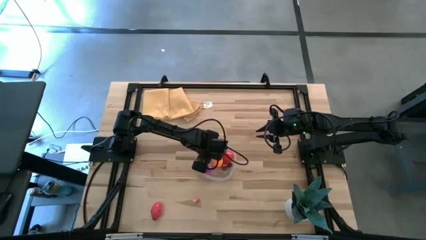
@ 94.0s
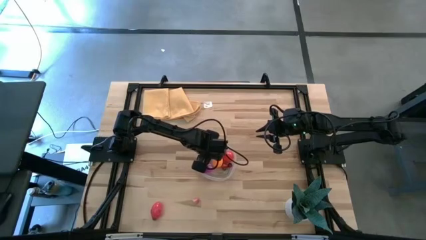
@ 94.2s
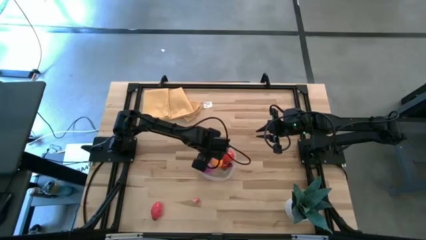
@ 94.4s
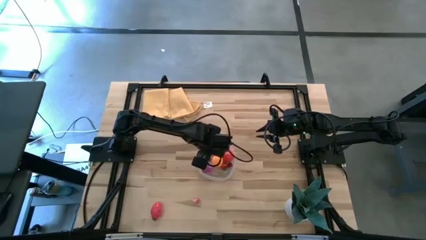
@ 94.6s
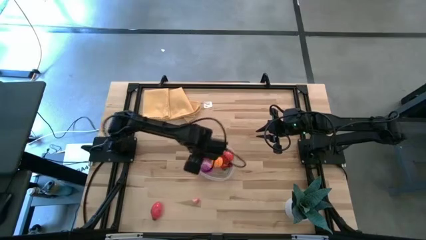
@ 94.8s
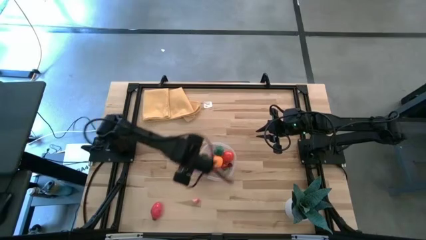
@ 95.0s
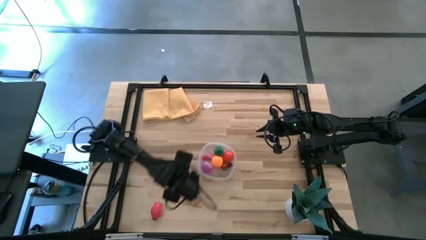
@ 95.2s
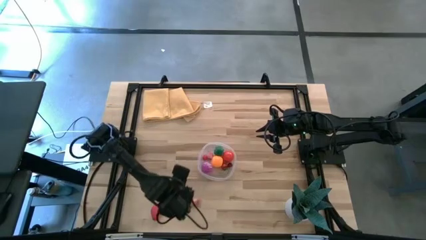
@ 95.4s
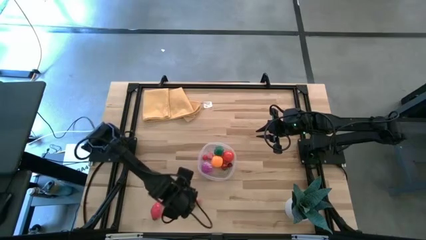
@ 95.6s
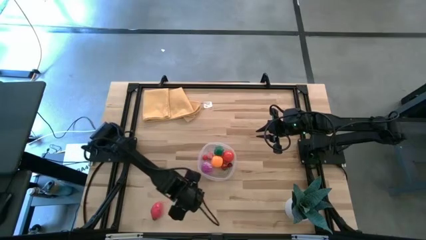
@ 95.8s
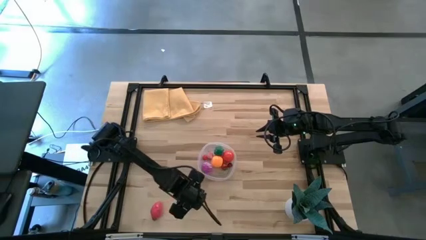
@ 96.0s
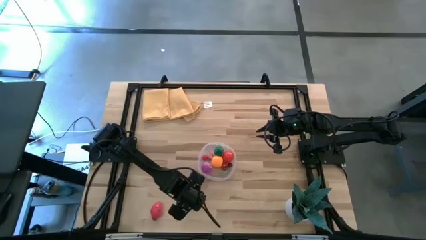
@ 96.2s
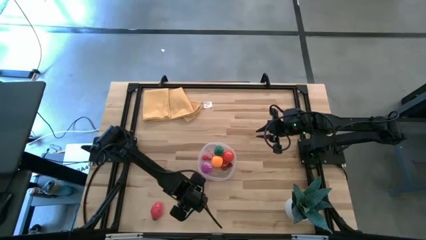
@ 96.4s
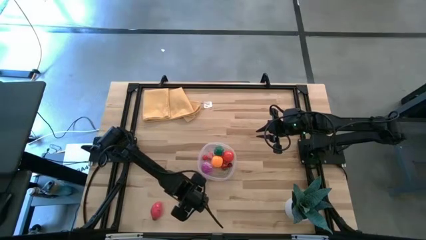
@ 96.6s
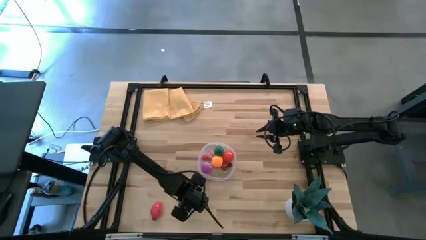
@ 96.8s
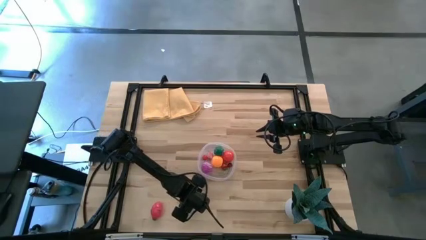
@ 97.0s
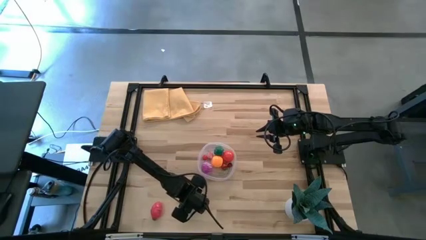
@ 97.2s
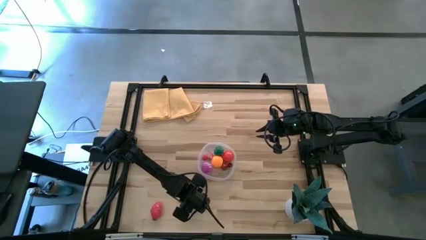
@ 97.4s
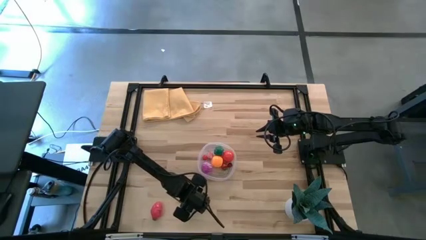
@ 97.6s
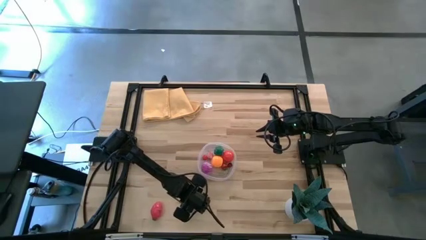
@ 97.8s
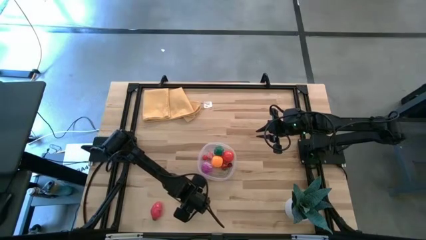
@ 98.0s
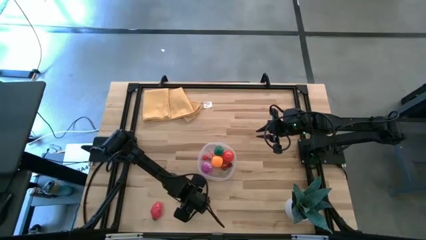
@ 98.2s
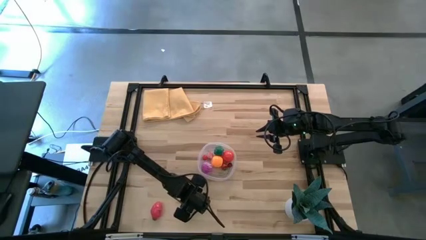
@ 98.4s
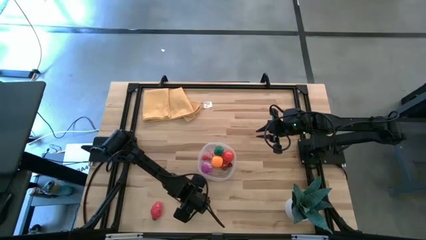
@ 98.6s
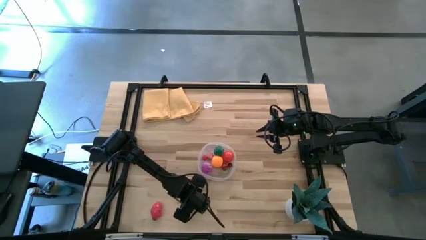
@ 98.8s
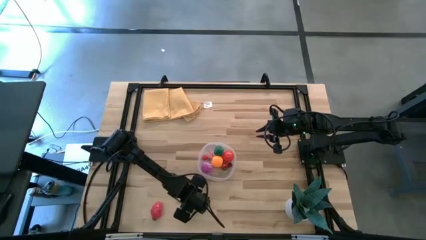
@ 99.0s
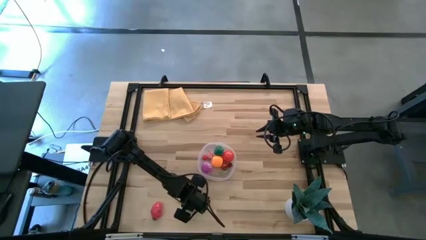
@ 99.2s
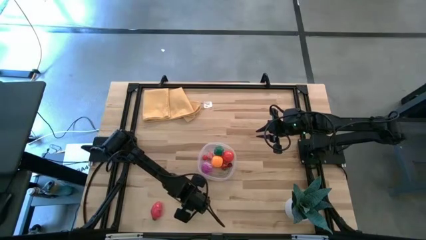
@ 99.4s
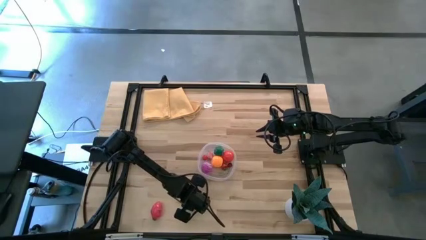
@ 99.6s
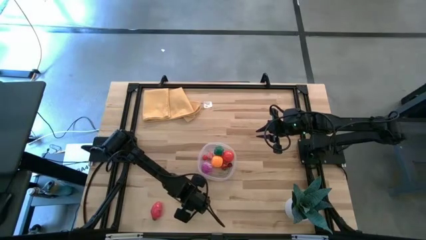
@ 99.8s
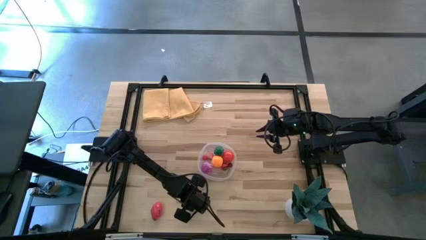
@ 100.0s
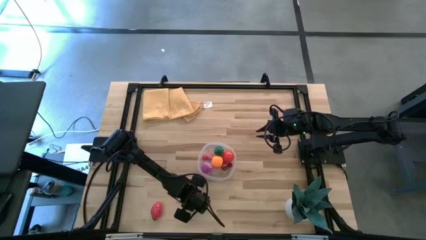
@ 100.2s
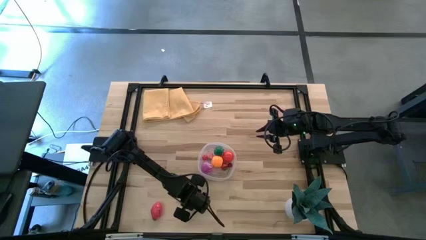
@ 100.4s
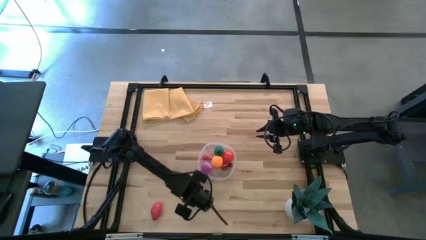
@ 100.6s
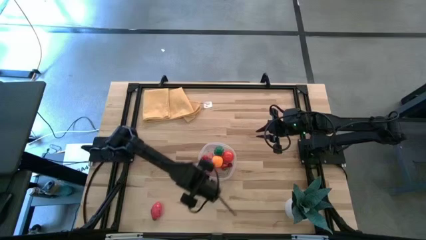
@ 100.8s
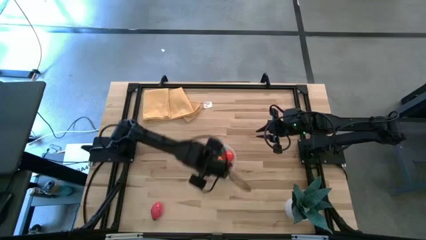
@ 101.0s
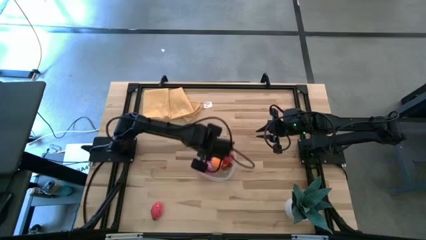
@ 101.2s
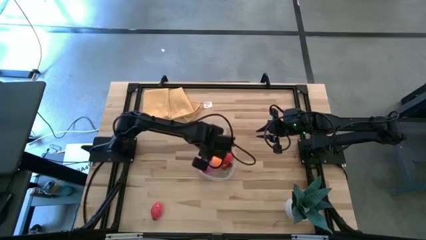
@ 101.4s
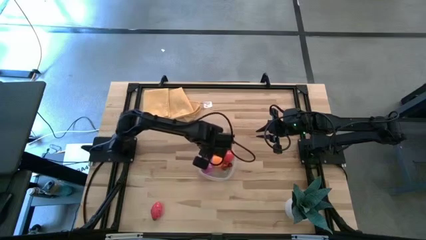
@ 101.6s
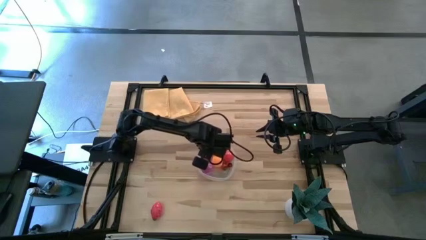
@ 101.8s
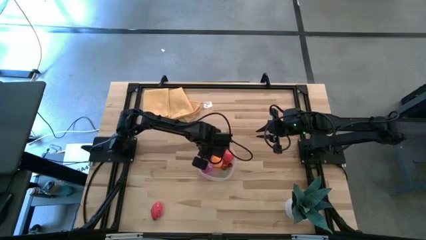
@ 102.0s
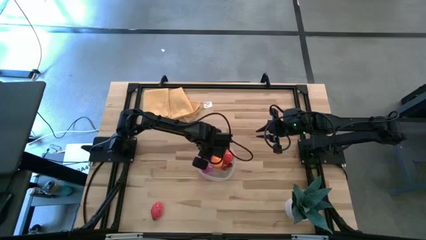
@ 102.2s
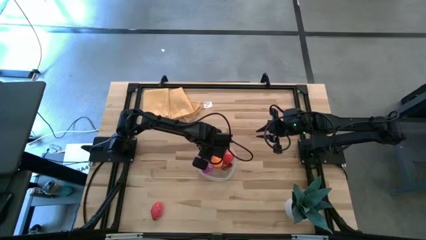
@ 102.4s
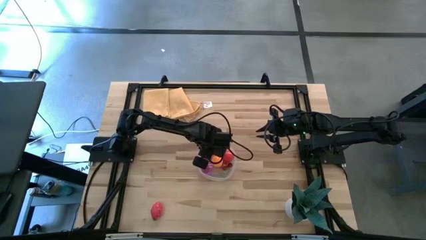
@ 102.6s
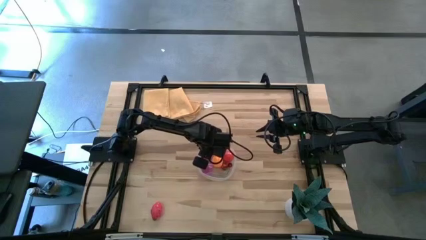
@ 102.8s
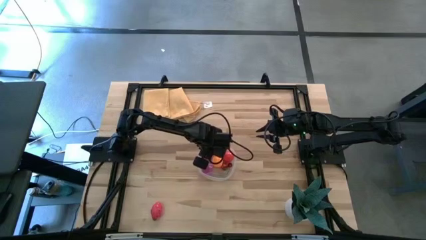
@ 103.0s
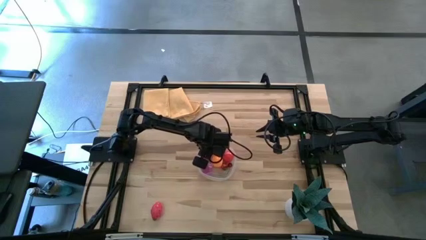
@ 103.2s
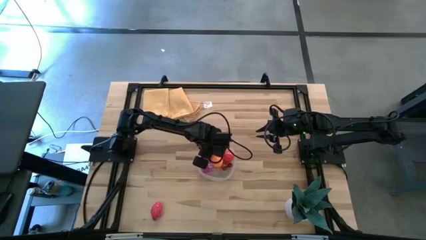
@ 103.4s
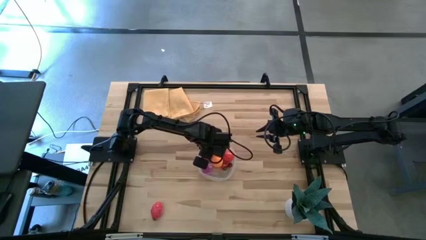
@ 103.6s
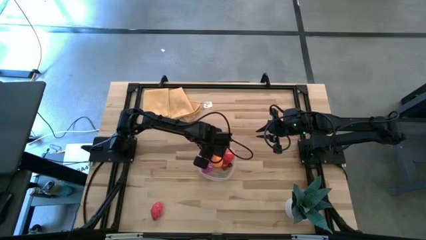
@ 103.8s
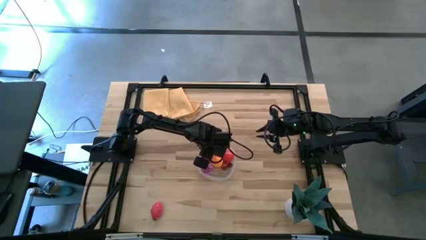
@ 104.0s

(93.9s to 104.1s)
Task: Pick and placing Produce into tupperware
Put the pink peach into the transparent bin

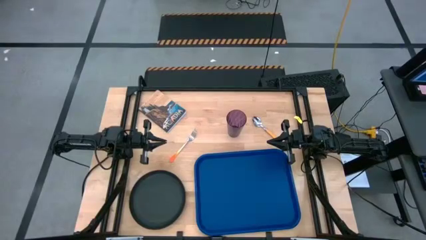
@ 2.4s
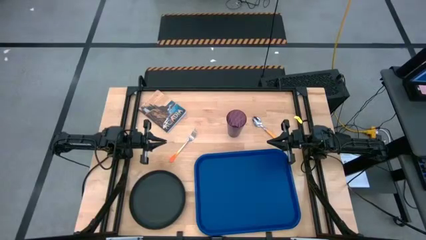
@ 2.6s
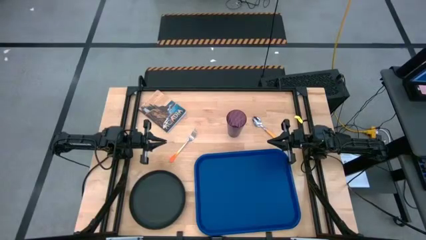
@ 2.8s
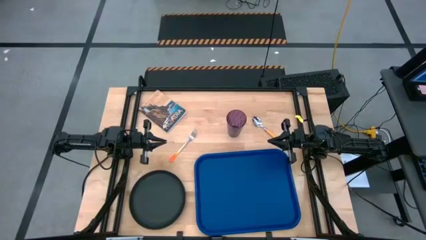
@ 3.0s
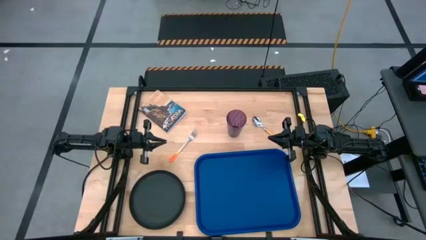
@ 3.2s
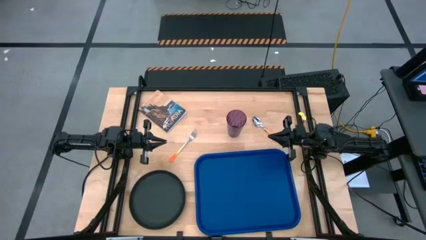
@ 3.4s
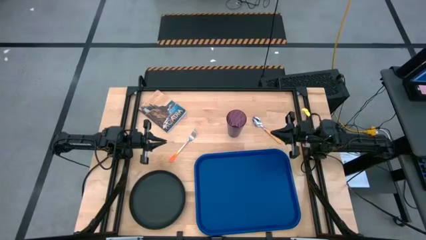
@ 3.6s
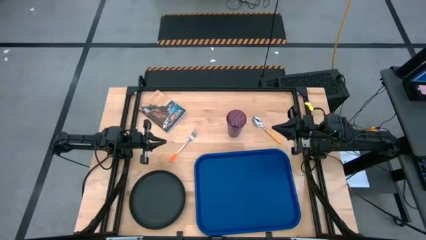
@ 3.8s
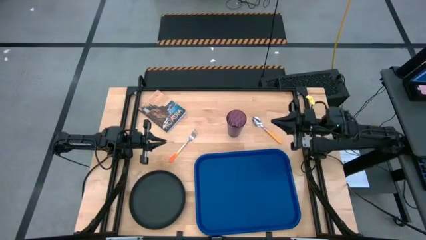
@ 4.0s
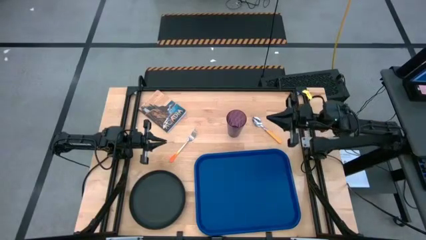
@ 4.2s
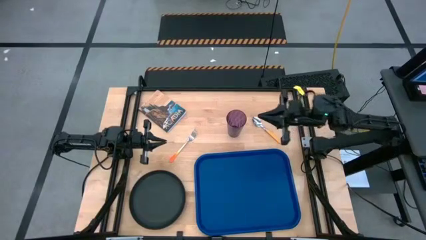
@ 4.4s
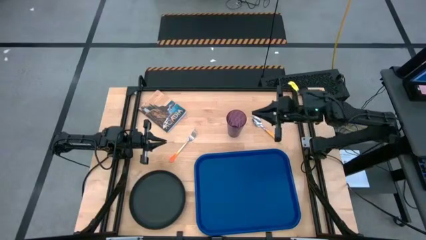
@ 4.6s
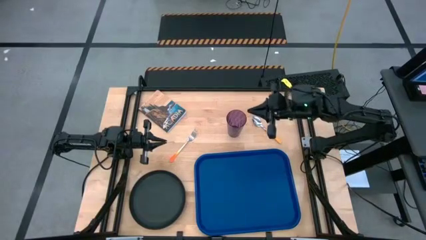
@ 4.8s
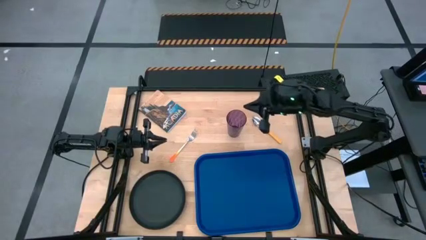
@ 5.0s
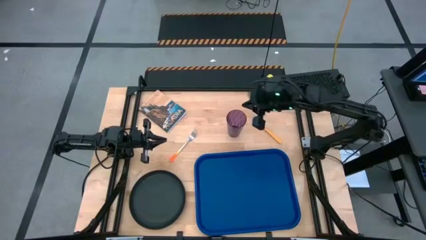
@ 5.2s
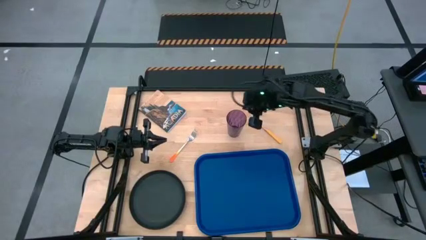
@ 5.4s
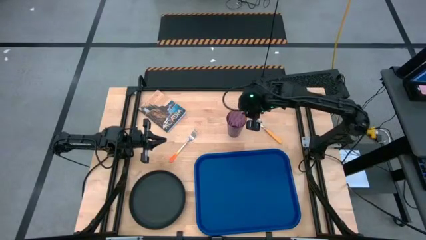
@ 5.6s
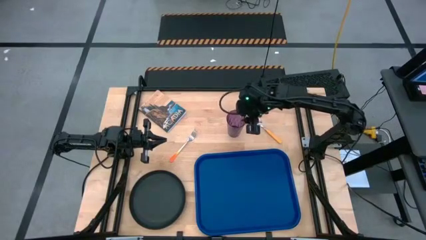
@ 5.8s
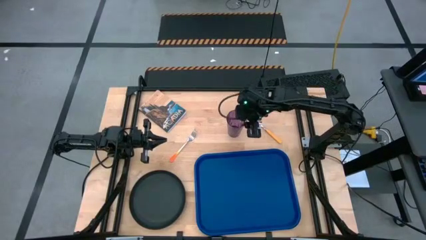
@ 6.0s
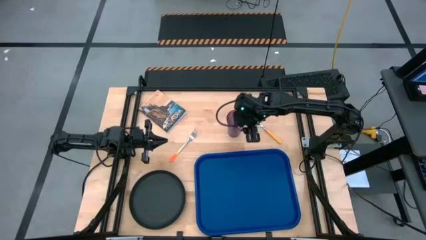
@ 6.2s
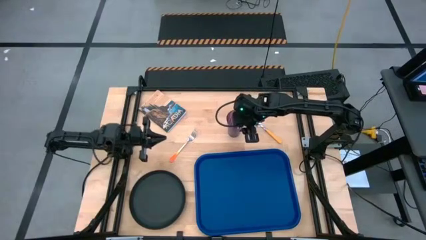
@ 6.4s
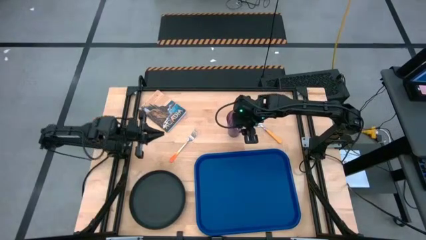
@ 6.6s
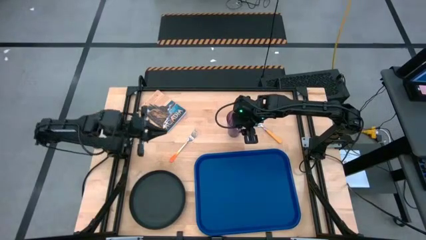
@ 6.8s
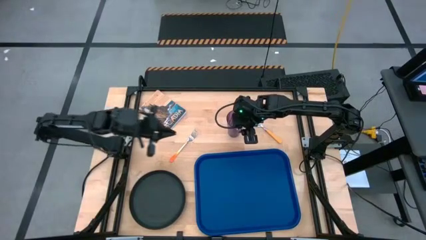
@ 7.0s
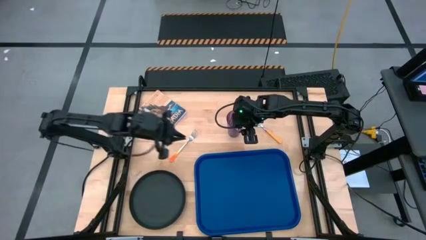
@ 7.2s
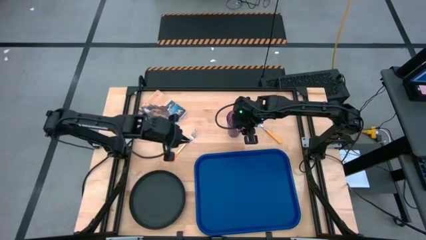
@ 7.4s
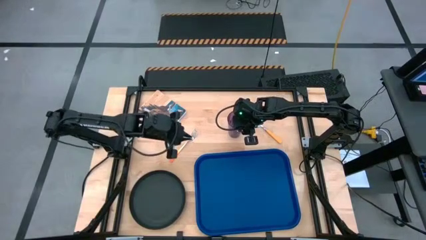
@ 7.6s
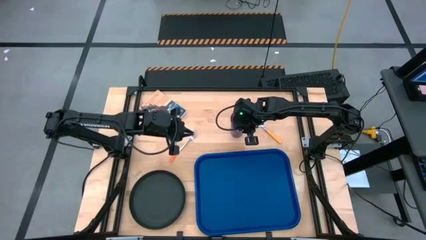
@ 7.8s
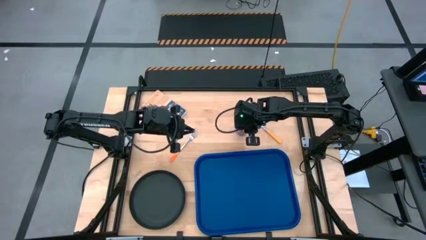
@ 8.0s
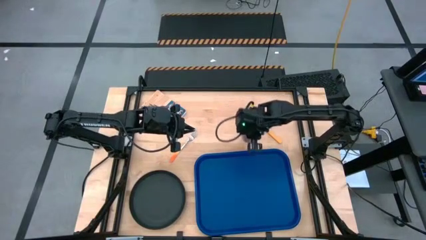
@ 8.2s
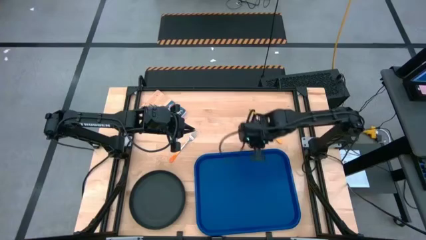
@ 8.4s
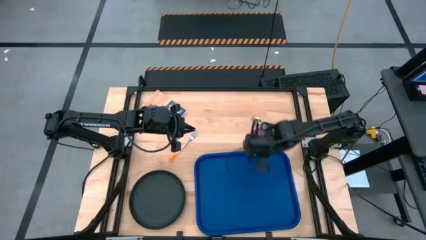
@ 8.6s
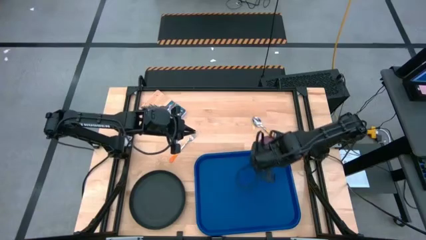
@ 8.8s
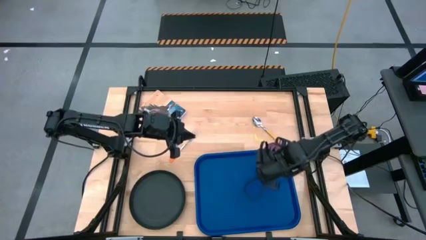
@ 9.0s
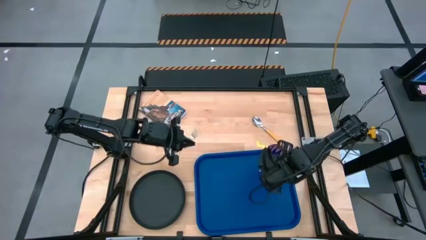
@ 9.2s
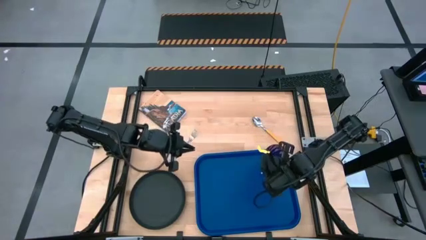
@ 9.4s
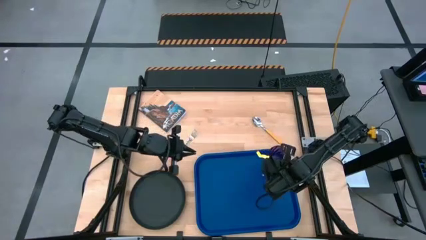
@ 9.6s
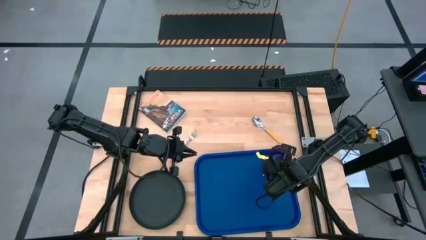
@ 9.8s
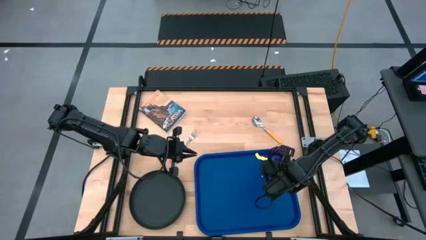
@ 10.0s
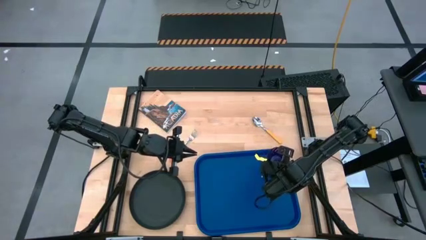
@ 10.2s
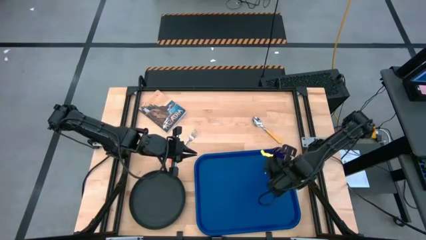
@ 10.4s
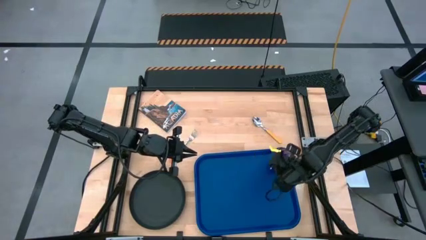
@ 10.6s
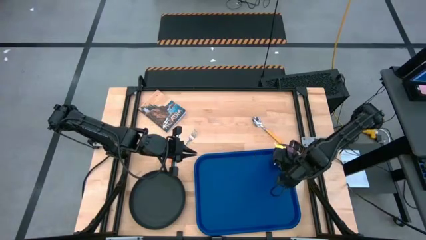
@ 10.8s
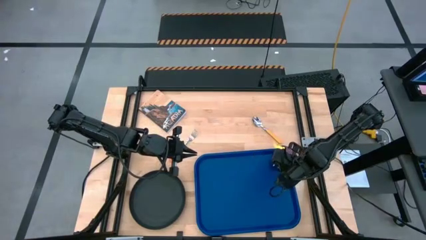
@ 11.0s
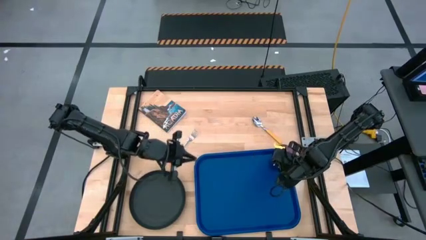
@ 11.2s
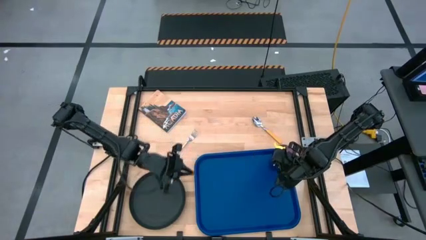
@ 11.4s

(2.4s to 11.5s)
Task: Pick and place plate/cup/fork/spoon on tray
Put the violet cup on the the blue serving tray
